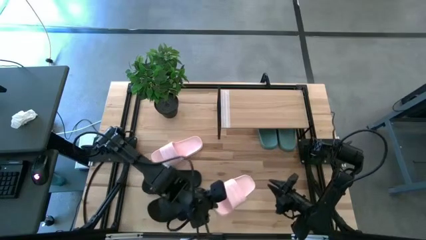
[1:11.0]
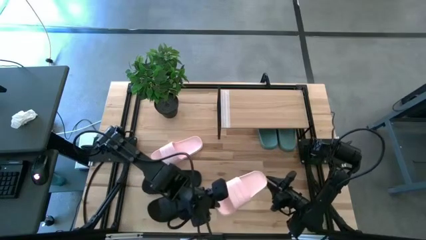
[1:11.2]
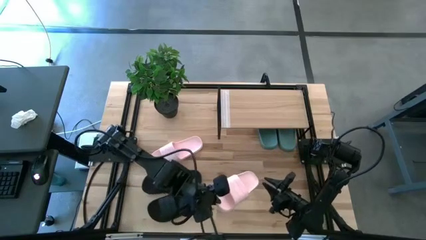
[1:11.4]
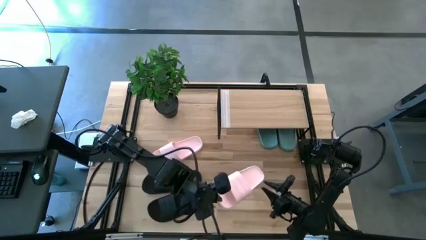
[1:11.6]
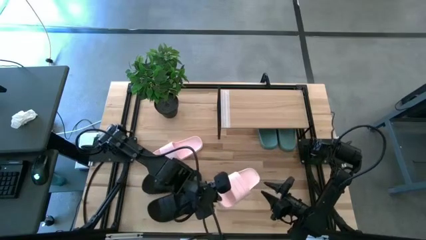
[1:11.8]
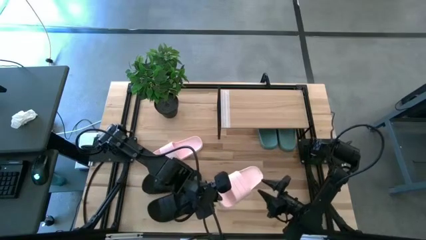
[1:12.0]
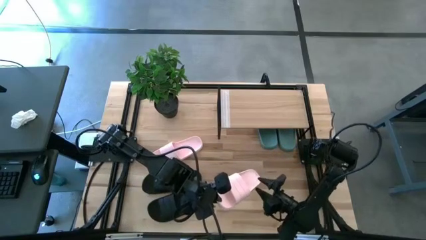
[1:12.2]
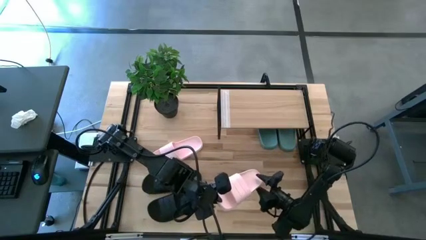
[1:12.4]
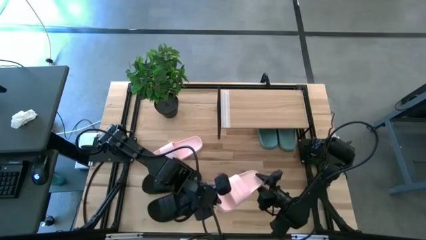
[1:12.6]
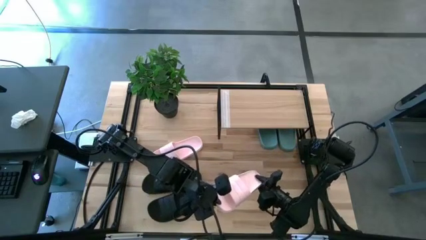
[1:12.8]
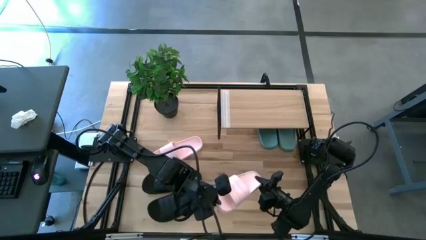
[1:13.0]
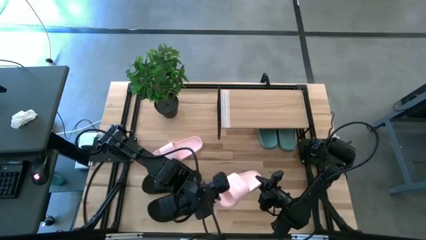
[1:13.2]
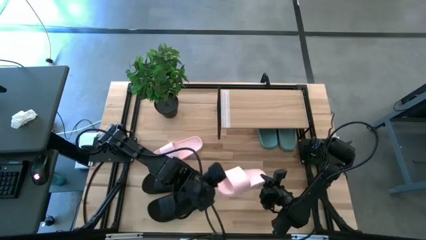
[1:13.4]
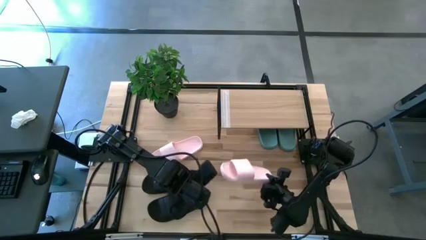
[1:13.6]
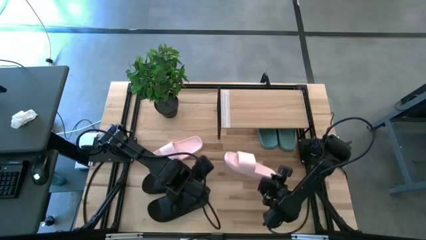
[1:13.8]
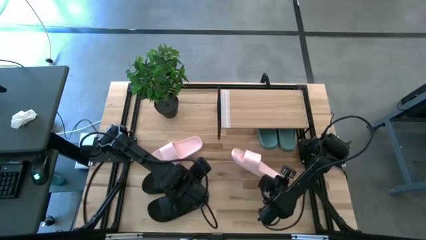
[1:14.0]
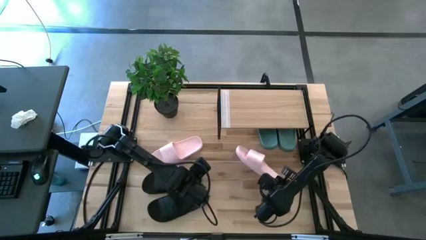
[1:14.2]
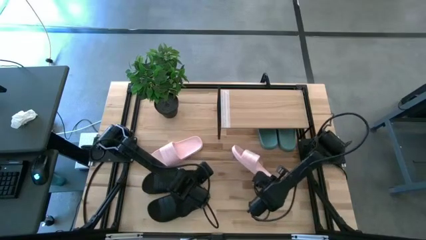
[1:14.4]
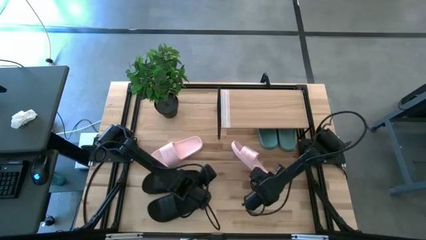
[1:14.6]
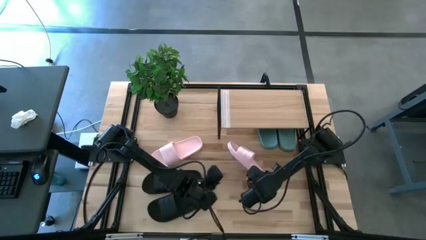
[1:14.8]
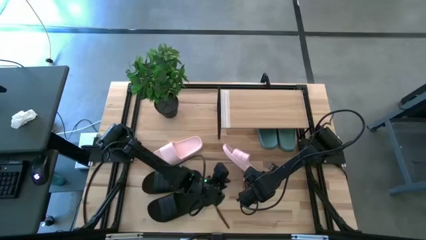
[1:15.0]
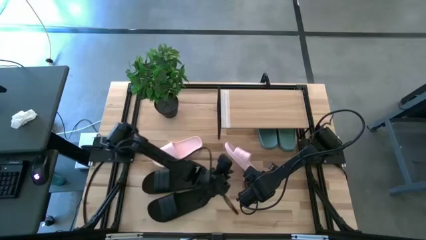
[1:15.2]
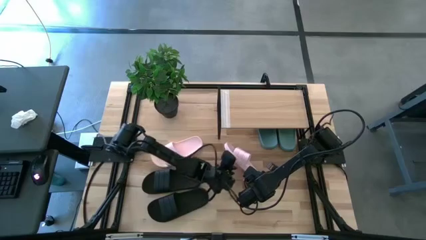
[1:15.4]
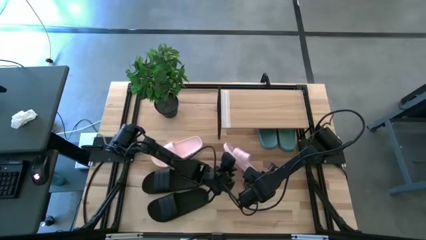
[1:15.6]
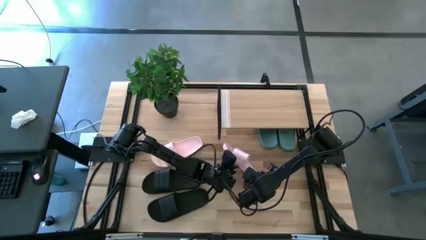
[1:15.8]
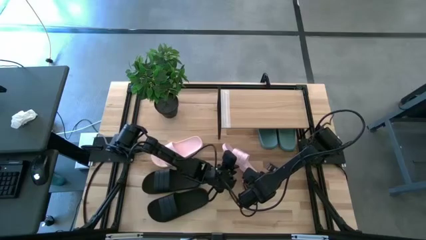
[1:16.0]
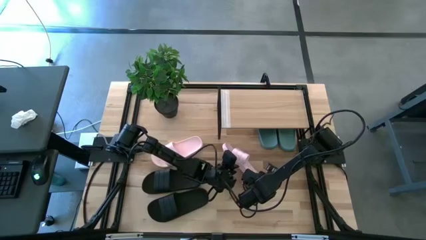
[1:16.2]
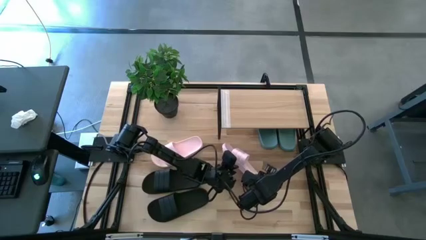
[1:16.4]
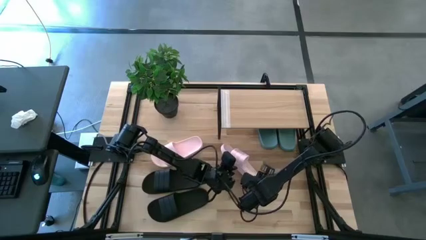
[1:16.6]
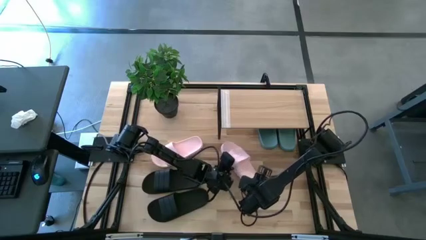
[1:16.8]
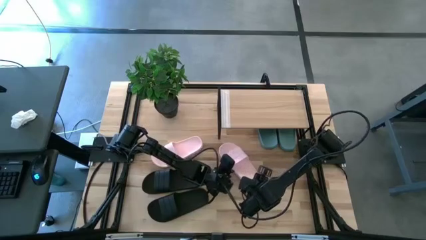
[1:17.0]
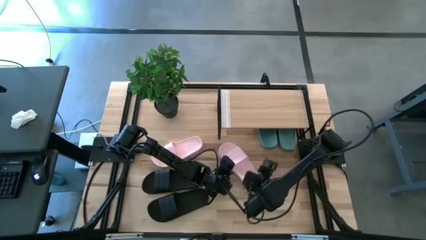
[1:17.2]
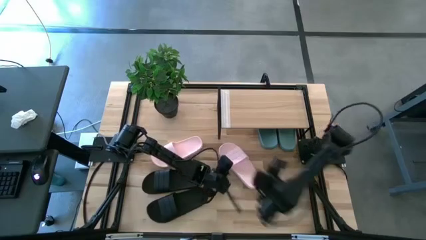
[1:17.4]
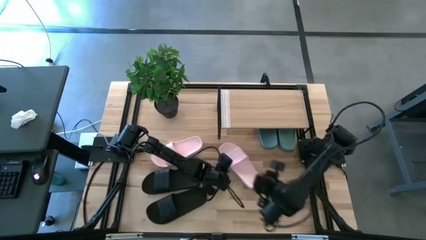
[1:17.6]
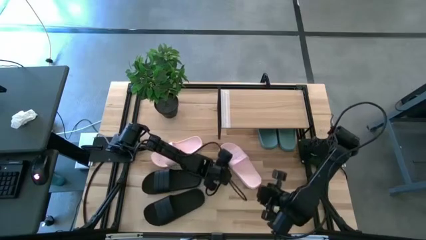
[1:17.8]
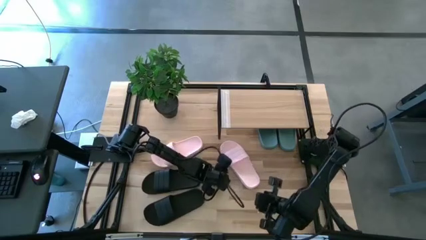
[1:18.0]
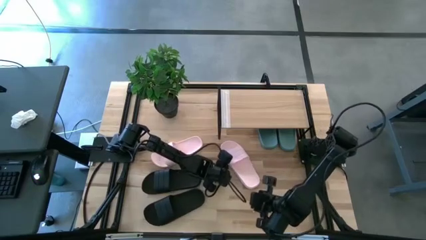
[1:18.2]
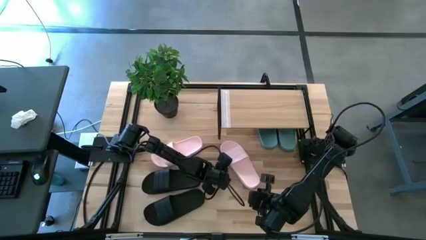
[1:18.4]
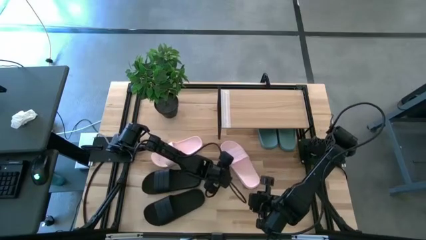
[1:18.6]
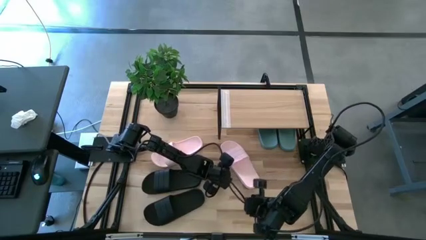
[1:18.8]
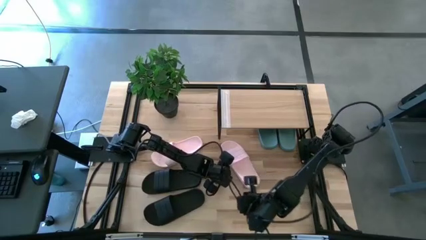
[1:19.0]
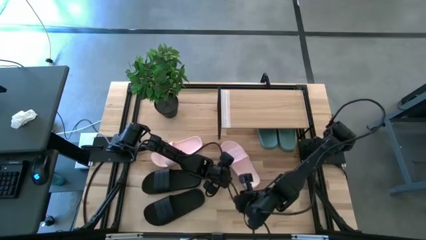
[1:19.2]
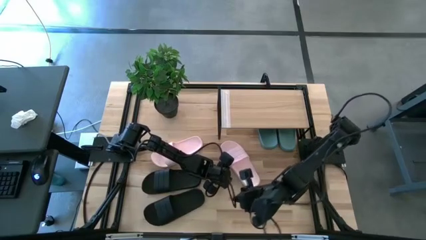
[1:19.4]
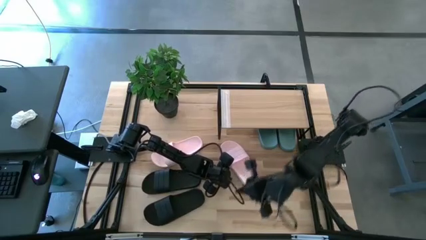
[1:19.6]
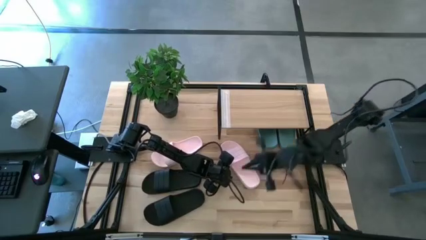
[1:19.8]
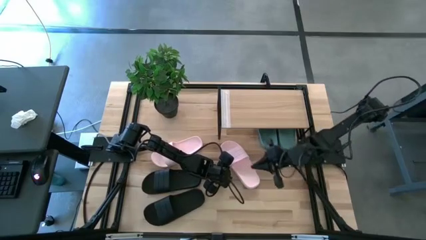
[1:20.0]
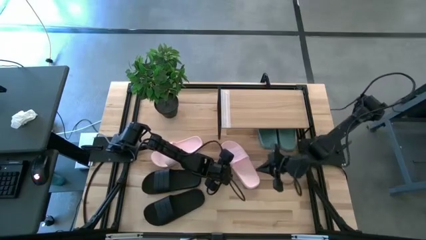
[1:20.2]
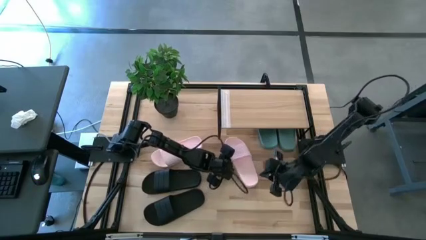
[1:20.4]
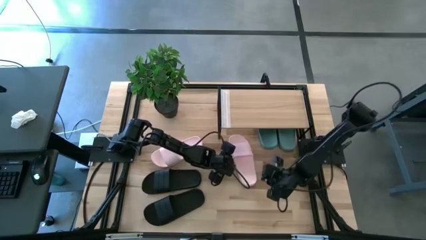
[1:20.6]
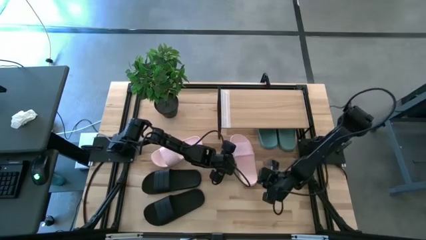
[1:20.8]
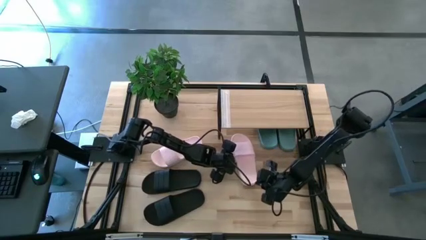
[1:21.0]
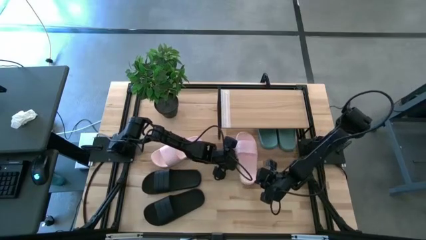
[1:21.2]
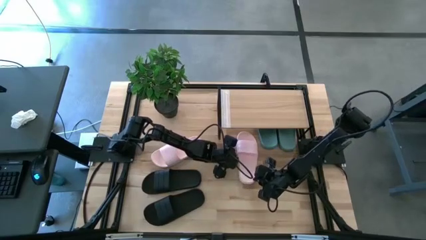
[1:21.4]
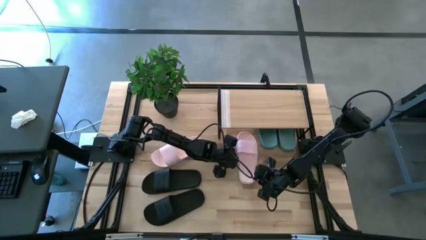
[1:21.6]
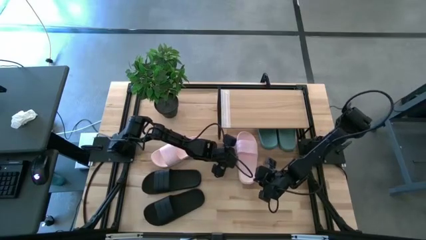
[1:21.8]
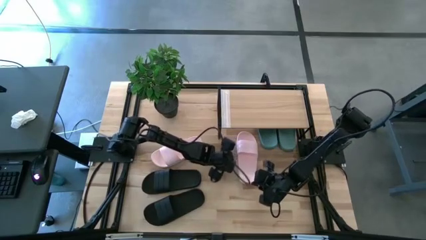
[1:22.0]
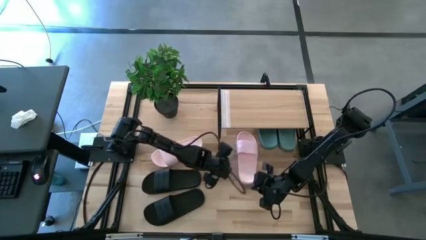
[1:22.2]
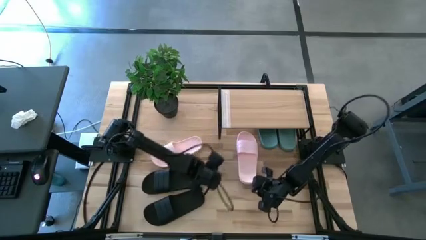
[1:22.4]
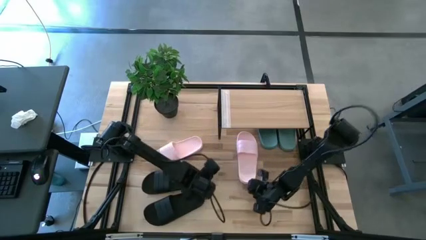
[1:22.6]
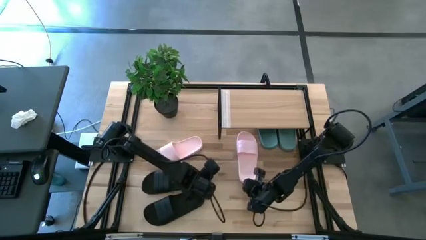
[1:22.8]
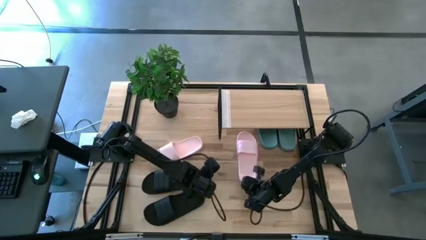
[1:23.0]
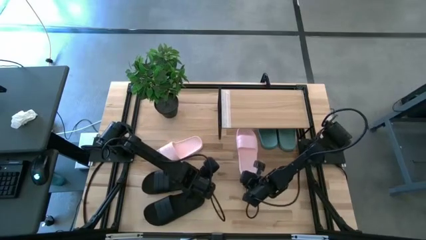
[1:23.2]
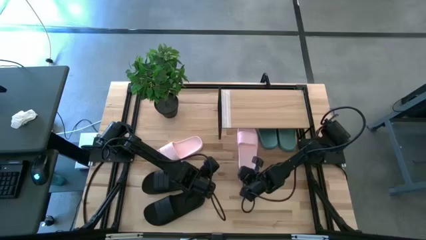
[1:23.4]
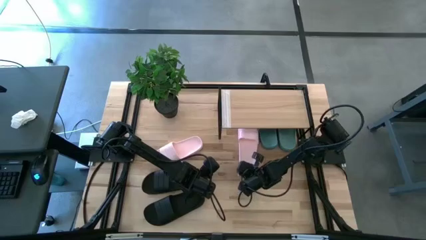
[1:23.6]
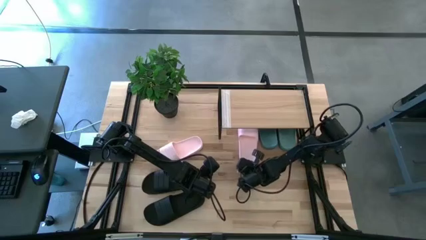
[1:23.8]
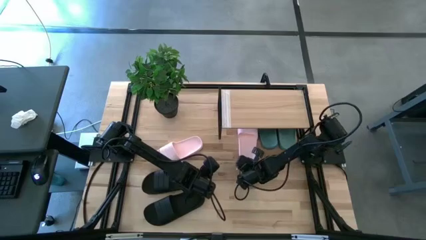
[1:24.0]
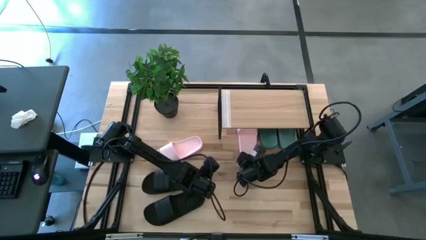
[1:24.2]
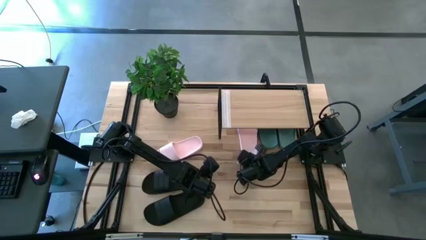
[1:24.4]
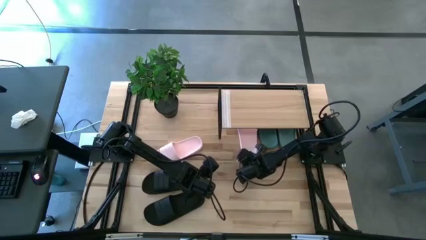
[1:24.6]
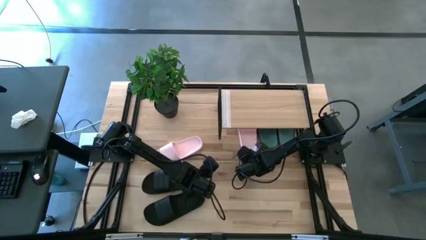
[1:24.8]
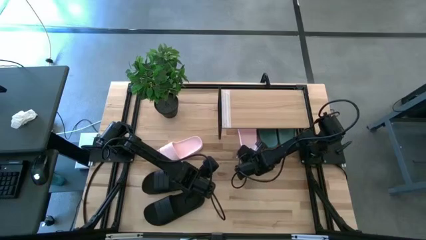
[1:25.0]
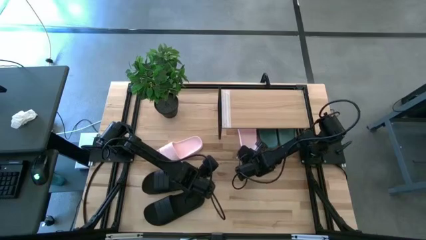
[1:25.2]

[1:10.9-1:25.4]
Task: Pick and place slides into the shelf
Put the right pink slide under the shelf
